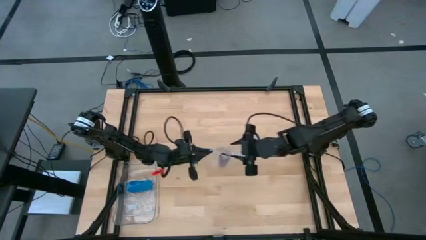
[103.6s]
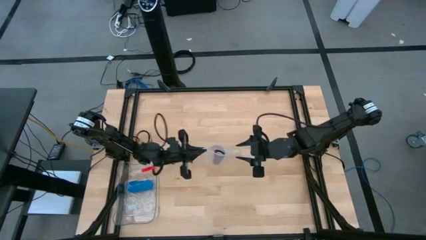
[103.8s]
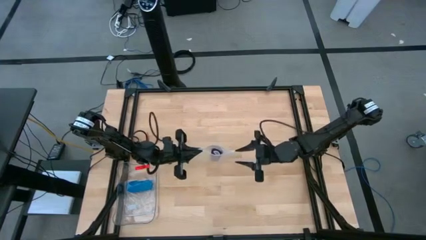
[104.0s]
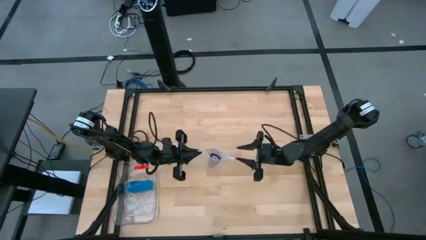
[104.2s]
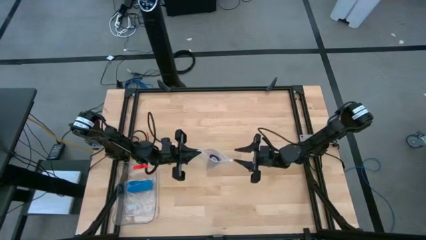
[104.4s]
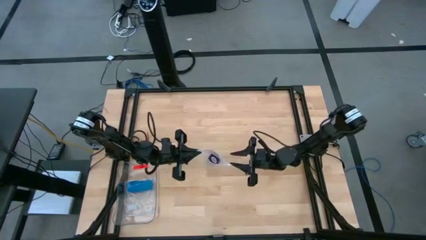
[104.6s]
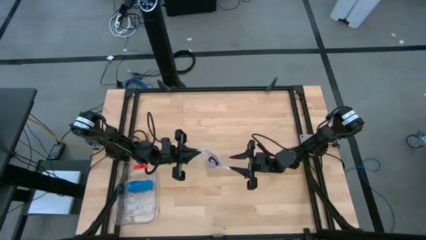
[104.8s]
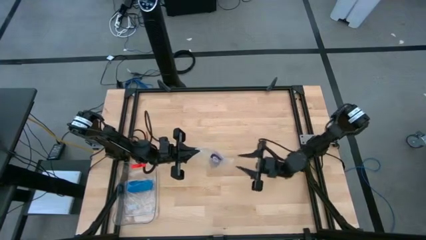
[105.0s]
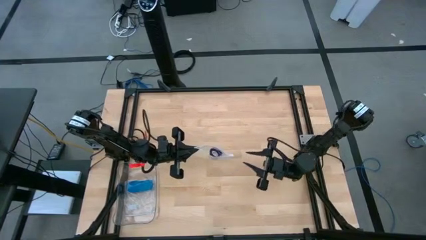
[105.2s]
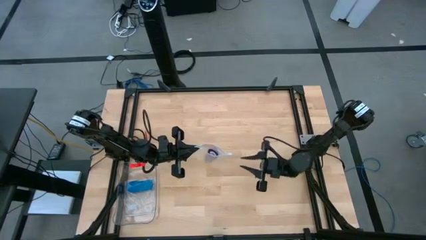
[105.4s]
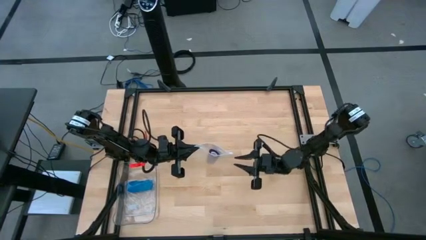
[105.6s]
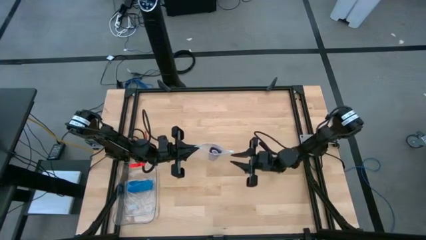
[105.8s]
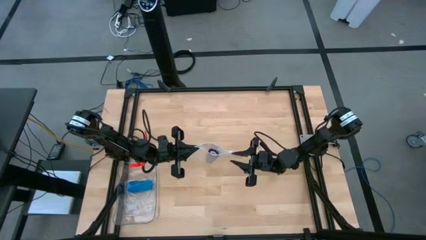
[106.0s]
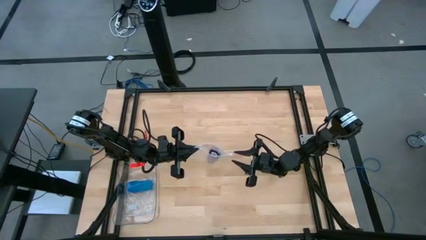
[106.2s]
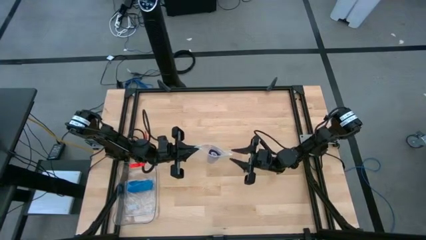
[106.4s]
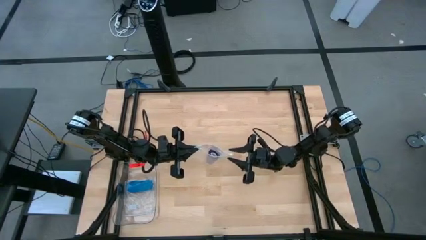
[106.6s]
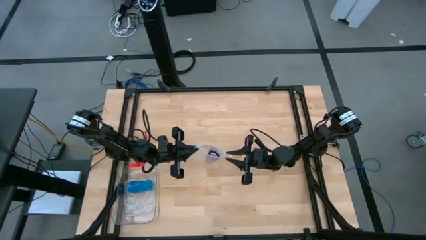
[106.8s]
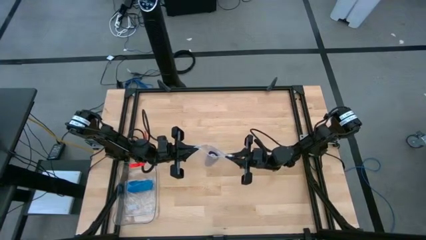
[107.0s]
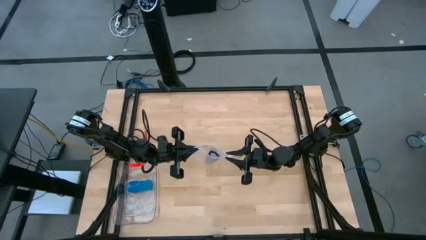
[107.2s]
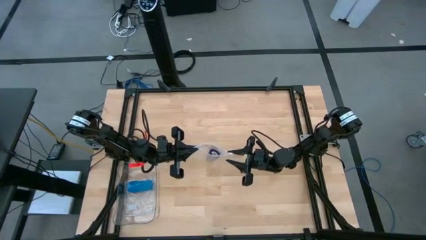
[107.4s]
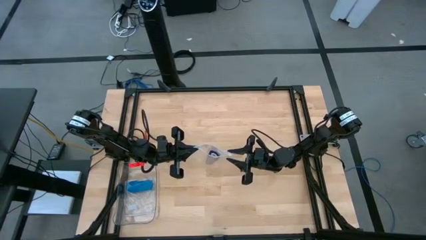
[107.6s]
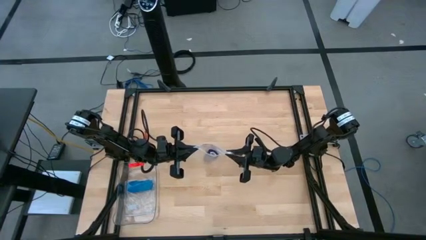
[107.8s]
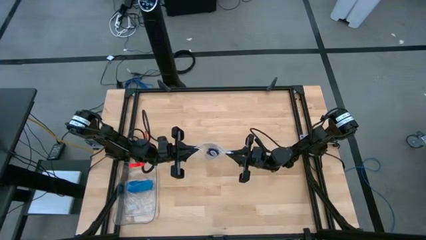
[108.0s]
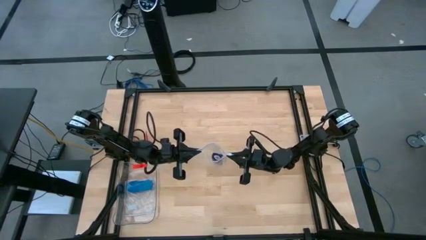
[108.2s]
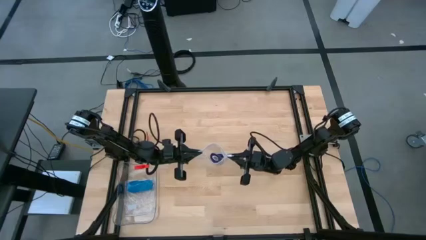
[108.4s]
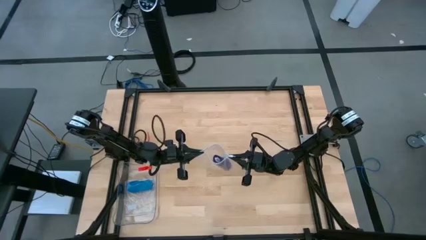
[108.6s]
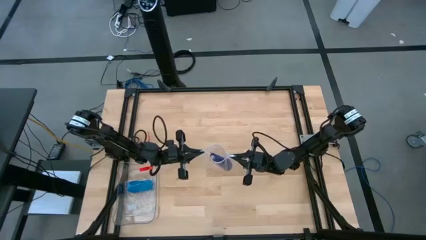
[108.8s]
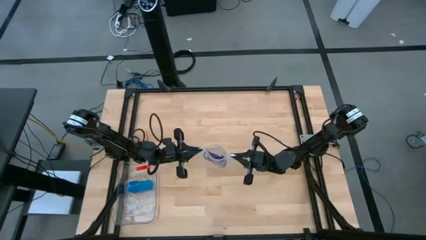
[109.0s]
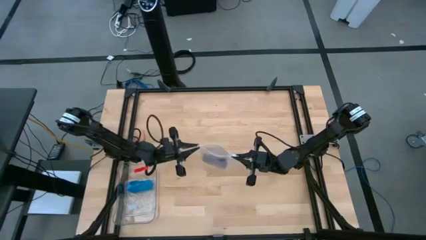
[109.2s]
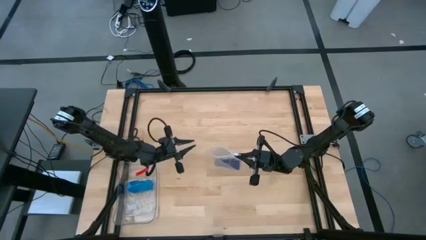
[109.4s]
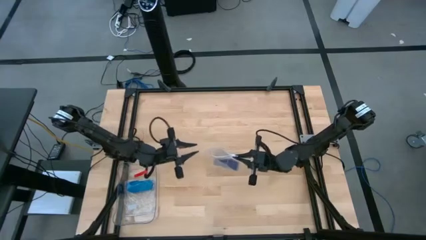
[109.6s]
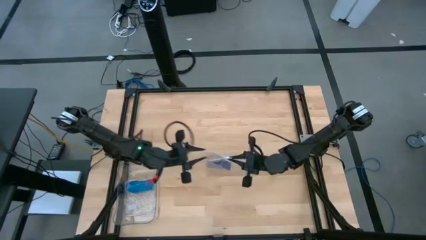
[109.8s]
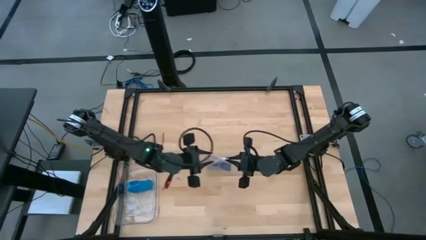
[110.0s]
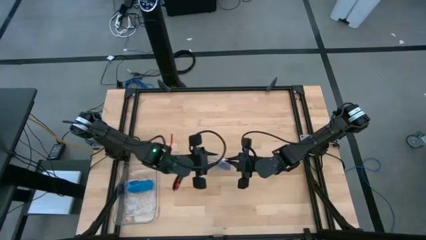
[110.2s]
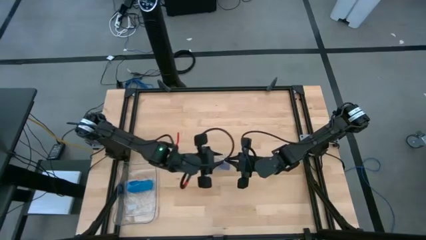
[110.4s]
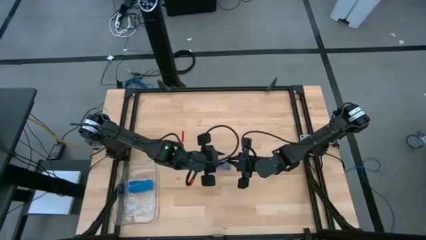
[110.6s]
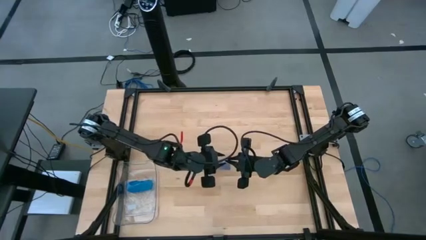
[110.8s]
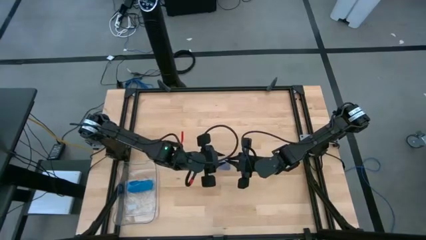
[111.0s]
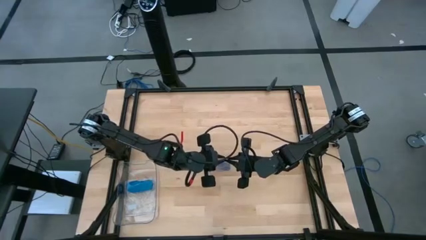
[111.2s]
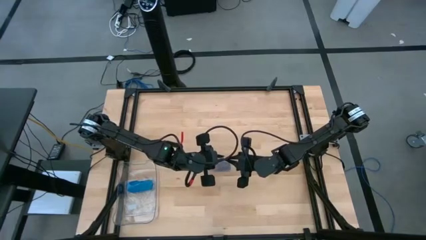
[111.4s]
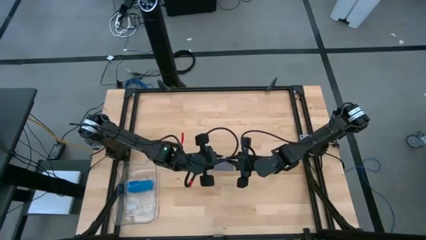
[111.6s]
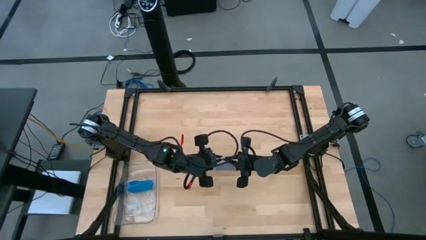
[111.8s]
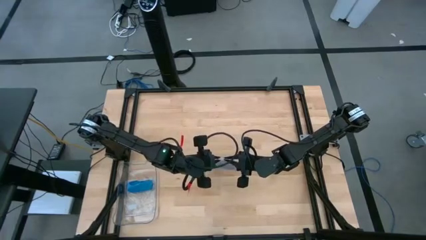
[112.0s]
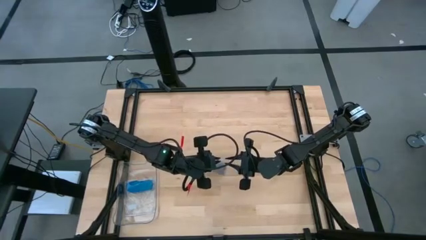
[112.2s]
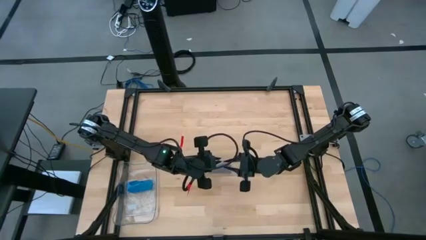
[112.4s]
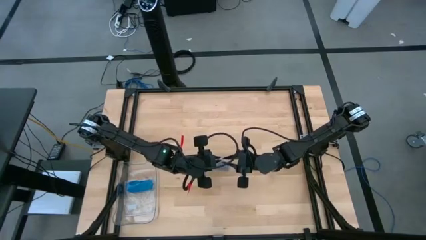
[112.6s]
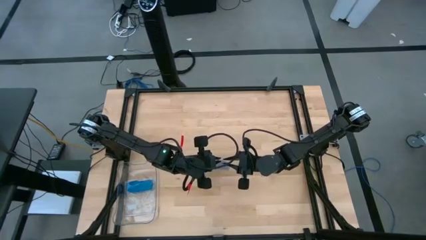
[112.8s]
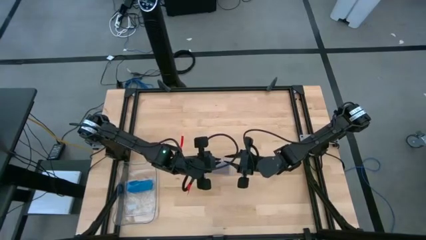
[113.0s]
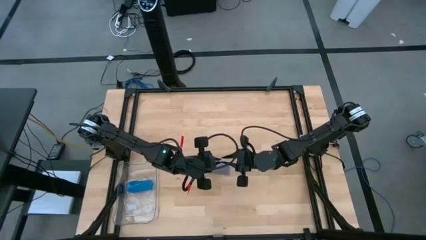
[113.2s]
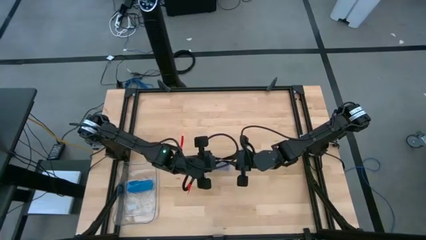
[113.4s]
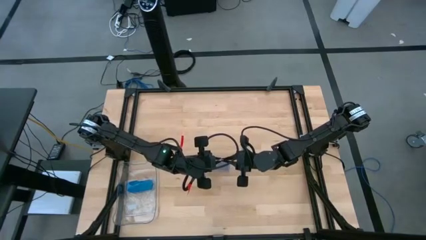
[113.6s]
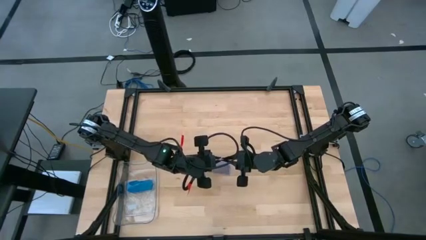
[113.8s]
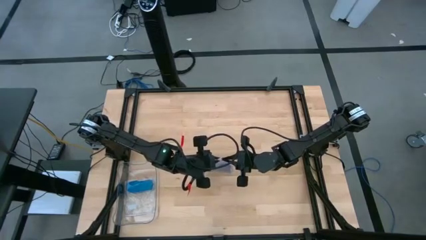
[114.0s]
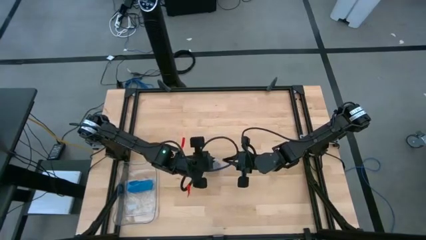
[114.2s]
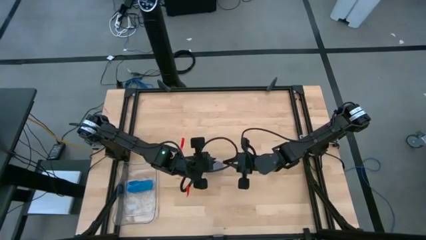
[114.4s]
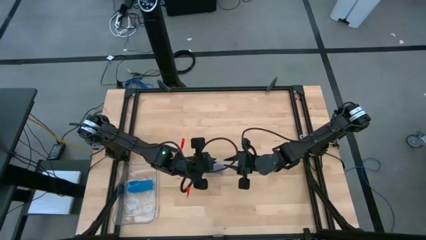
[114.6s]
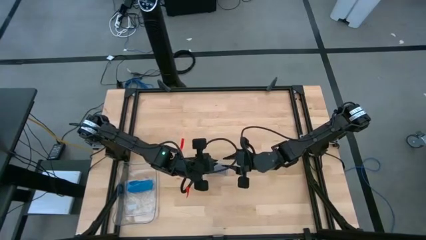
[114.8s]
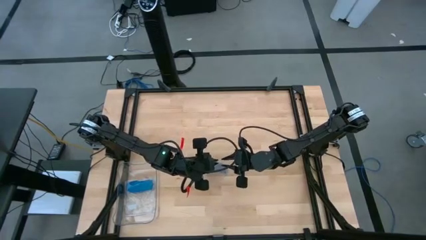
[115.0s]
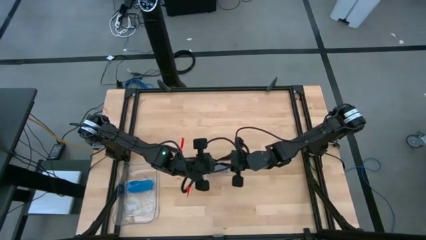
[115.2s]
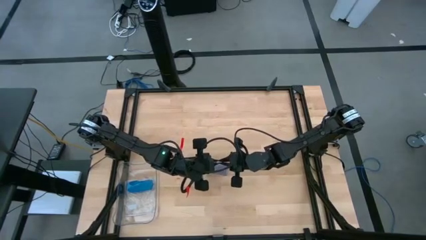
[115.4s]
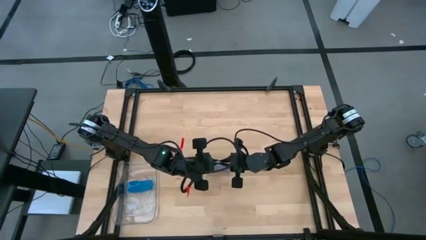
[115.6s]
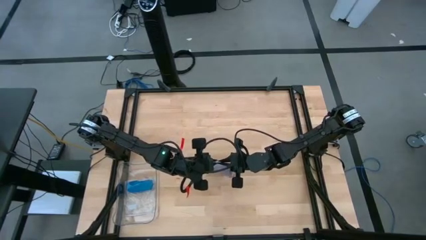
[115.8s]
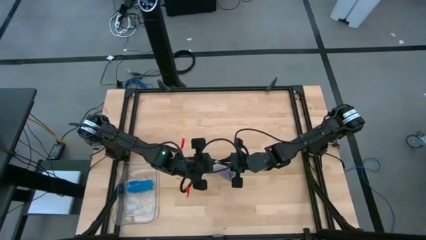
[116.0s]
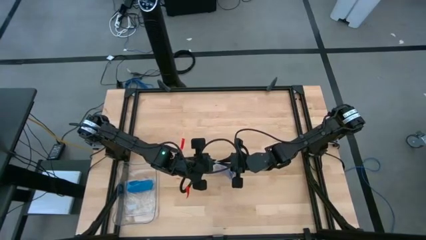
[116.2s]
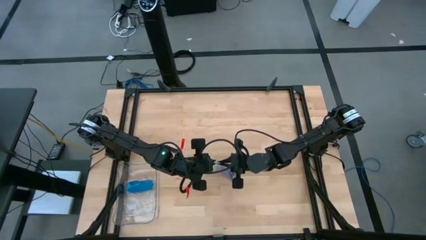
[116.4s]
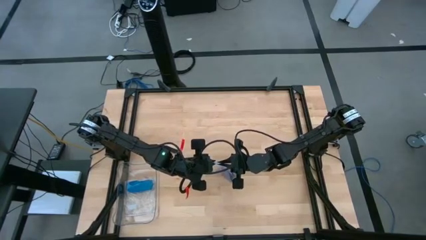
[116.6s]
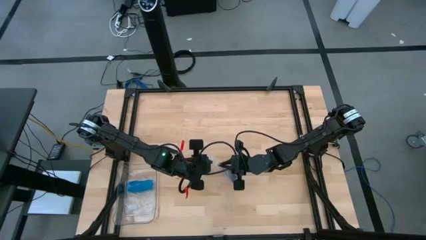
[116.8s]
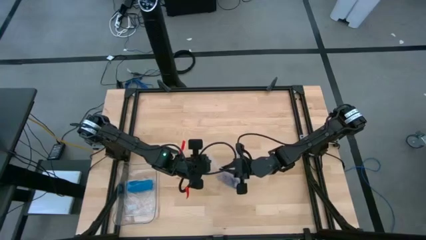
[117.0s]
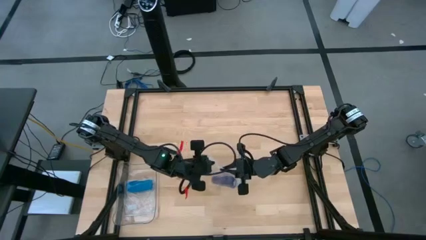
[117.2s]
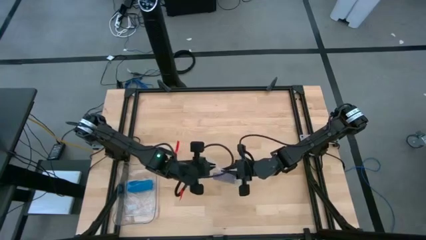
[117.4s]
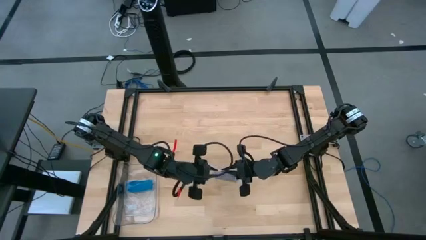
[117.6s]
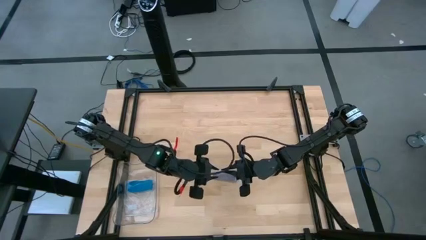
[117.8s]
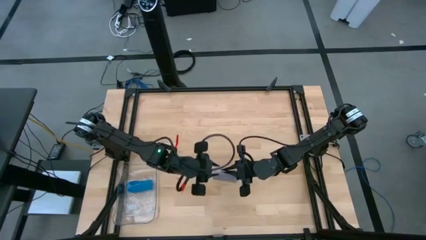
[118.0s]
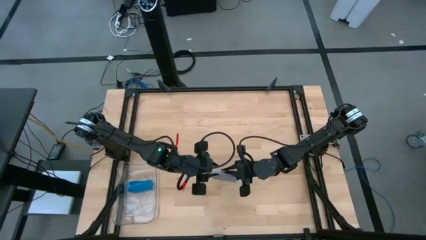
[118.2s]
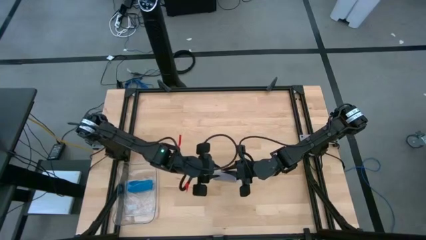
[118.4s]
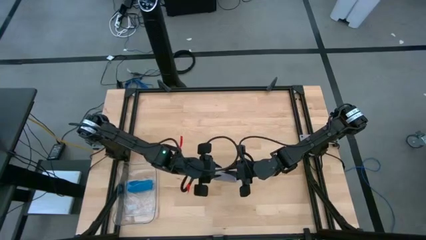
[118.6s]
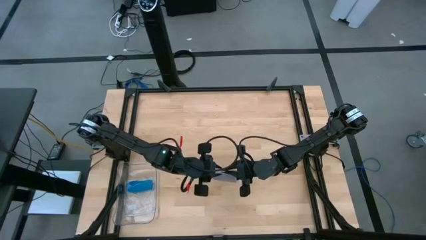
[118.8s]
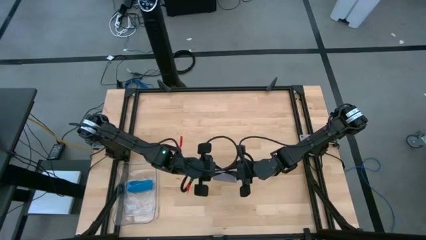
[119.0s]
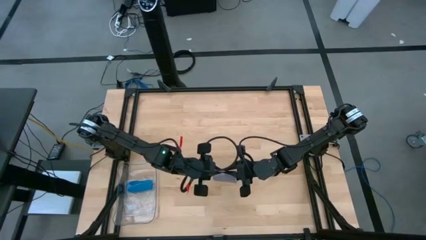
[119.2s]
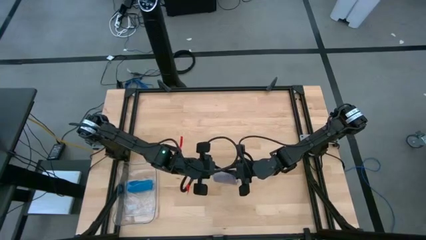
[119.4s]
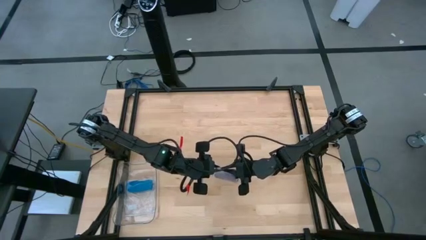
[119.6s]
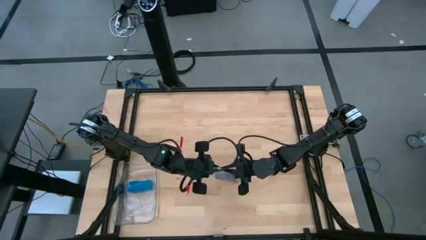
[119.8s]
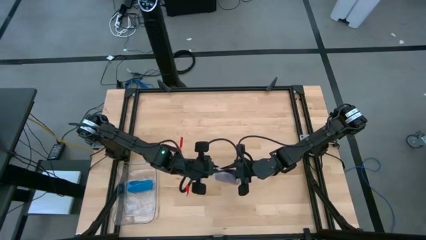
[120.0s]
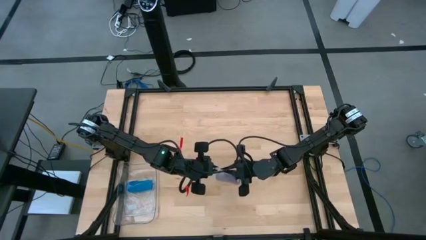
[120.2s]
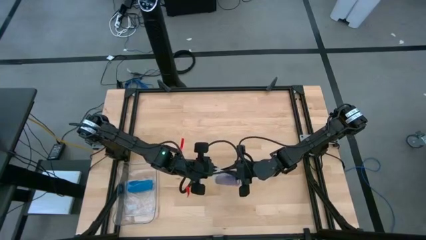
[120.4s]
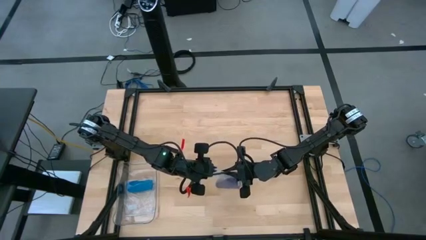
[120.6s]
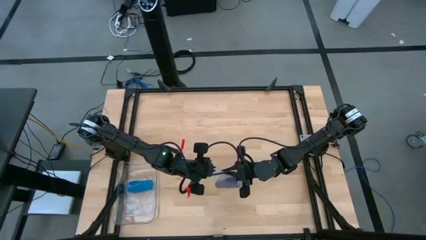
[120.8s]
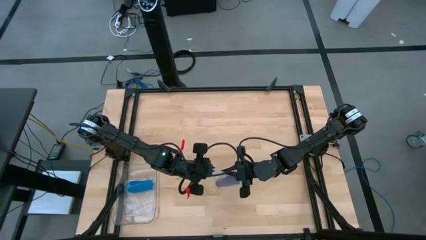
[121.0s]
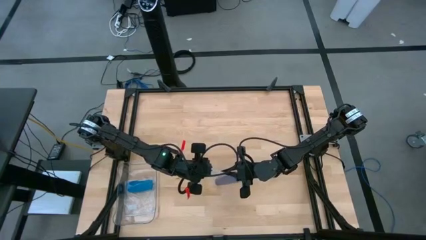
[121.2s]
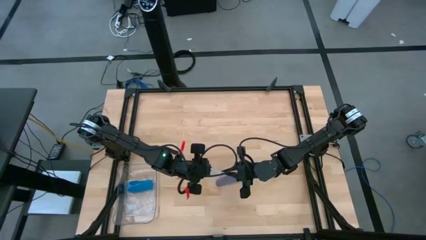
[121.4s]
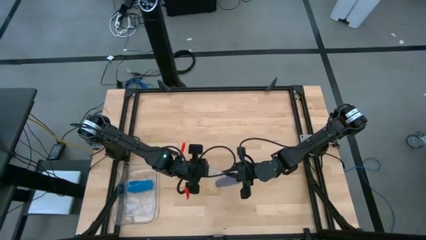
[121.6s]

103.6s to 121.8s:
Task: Roll bandage
Close the transparent zip bag
